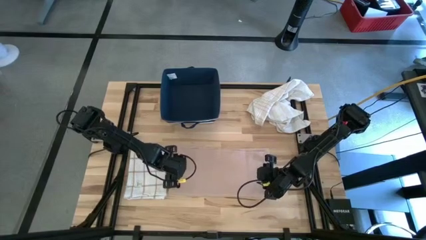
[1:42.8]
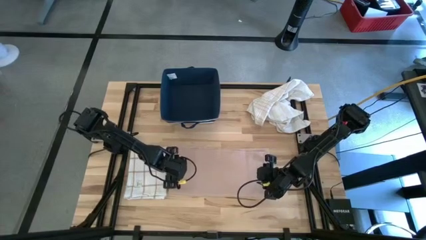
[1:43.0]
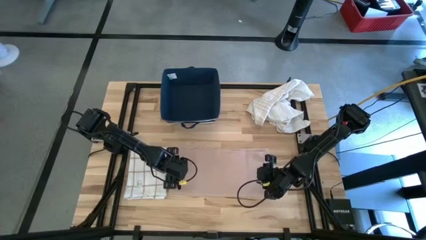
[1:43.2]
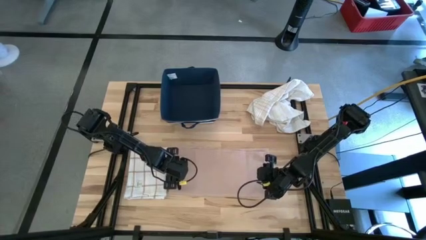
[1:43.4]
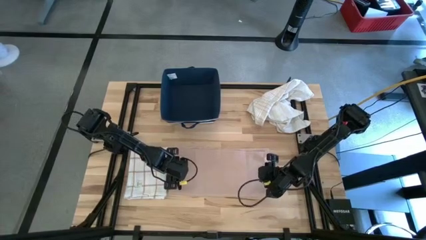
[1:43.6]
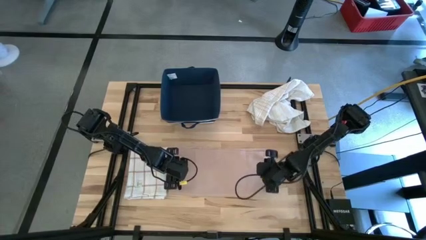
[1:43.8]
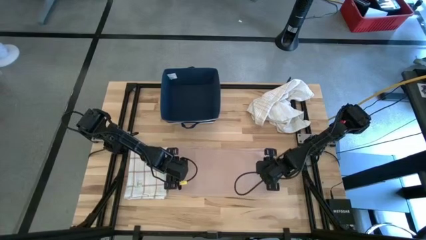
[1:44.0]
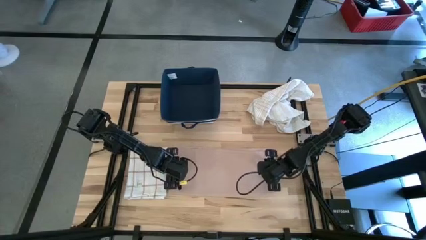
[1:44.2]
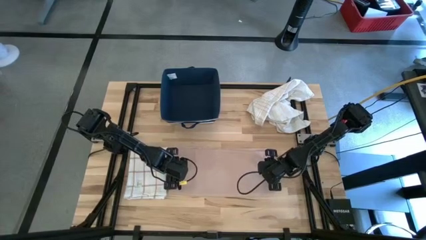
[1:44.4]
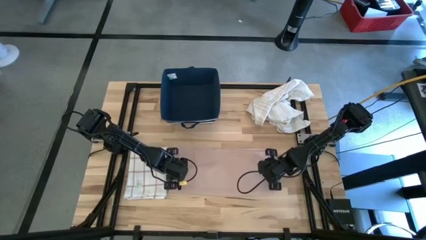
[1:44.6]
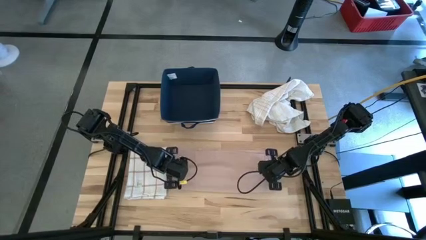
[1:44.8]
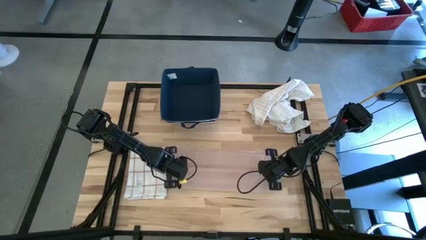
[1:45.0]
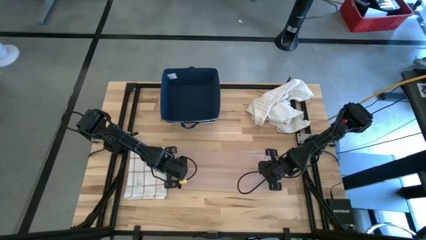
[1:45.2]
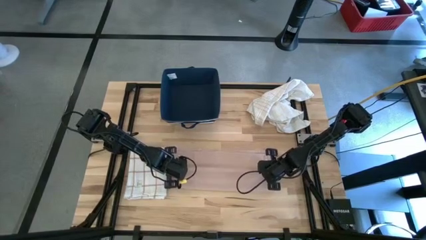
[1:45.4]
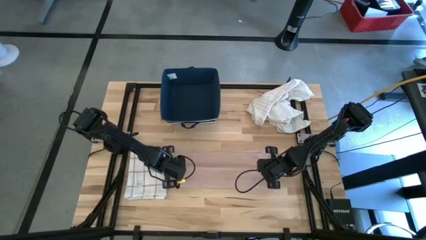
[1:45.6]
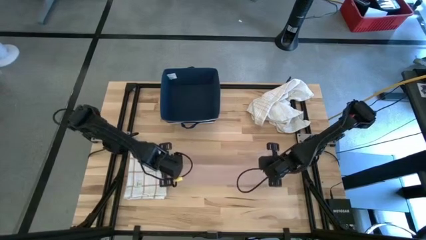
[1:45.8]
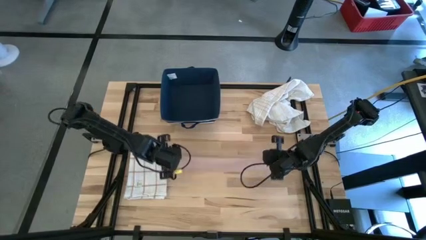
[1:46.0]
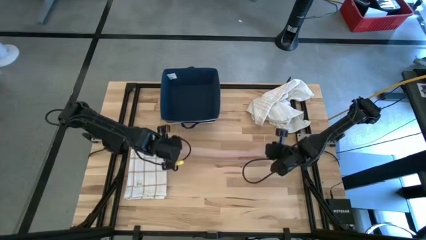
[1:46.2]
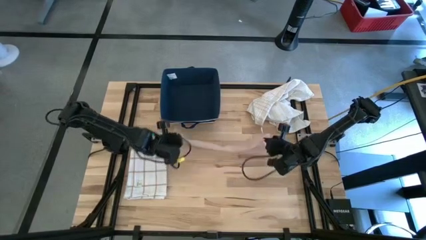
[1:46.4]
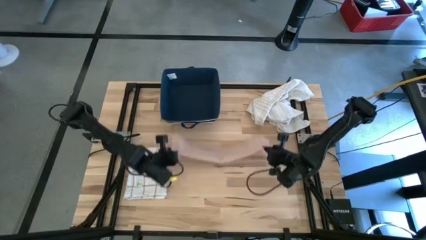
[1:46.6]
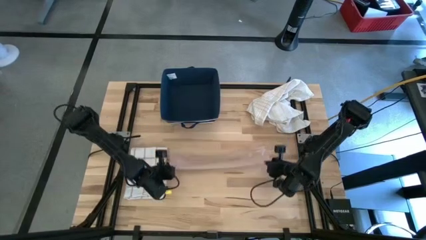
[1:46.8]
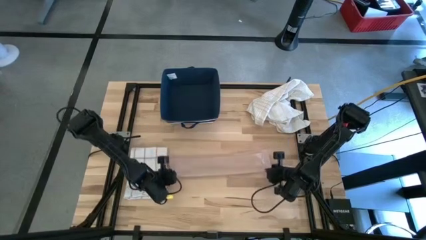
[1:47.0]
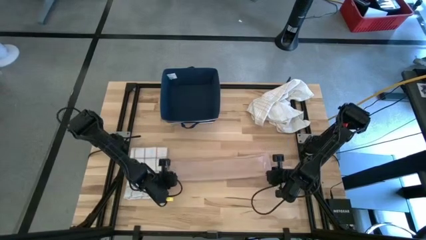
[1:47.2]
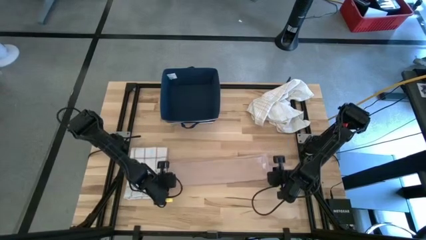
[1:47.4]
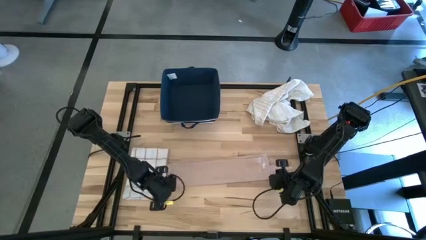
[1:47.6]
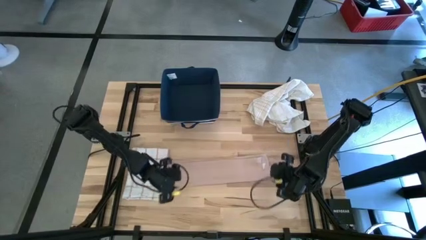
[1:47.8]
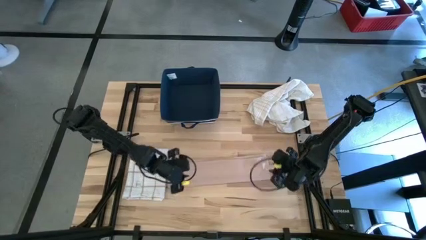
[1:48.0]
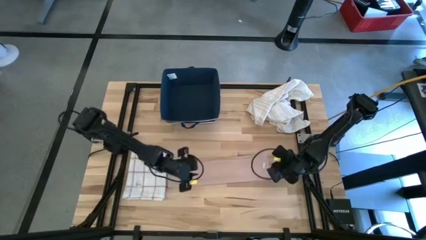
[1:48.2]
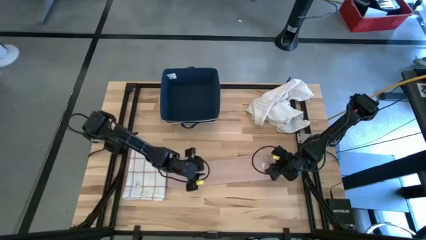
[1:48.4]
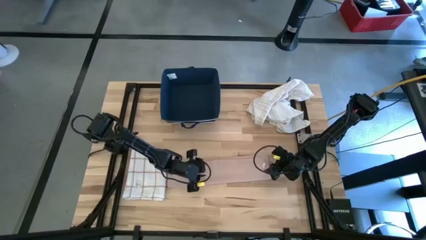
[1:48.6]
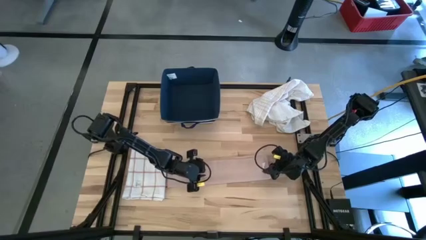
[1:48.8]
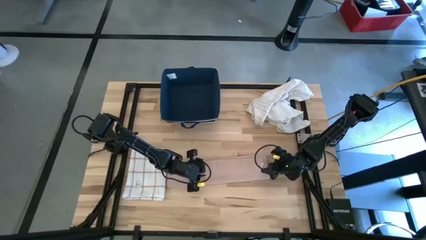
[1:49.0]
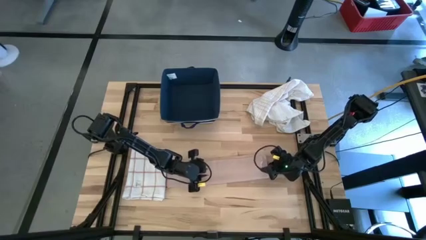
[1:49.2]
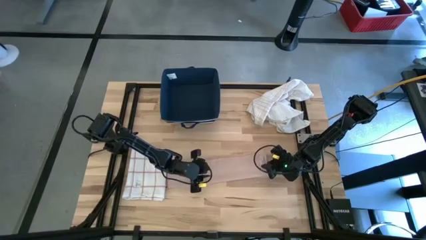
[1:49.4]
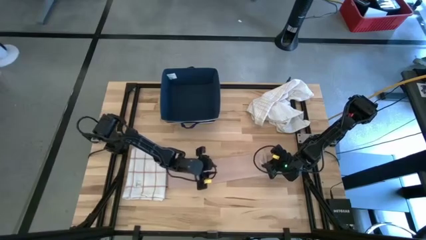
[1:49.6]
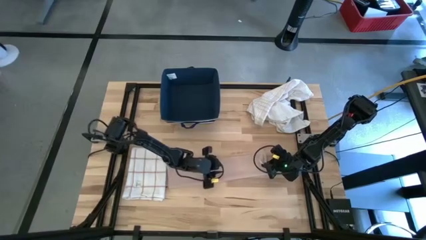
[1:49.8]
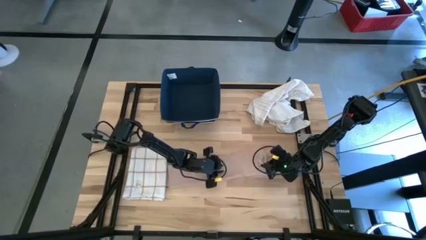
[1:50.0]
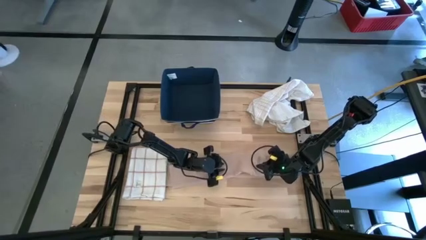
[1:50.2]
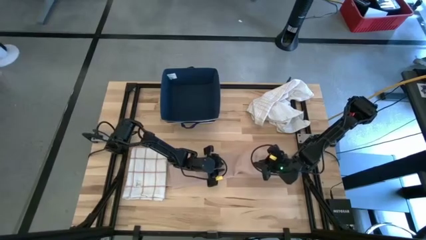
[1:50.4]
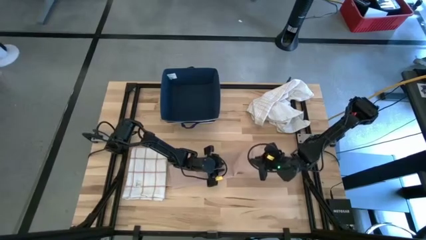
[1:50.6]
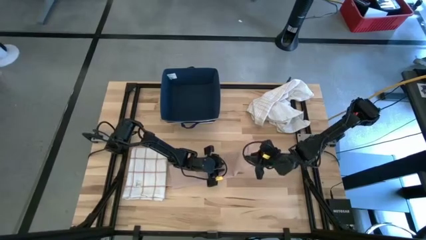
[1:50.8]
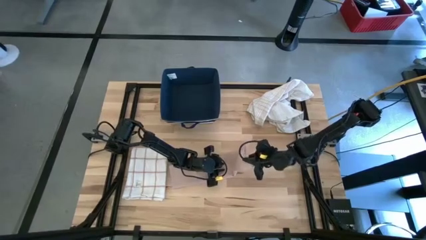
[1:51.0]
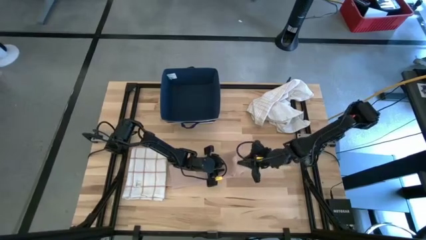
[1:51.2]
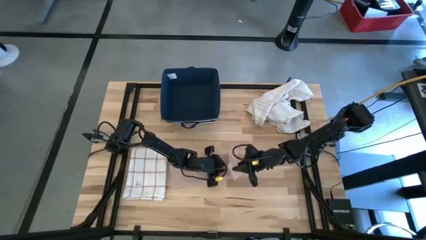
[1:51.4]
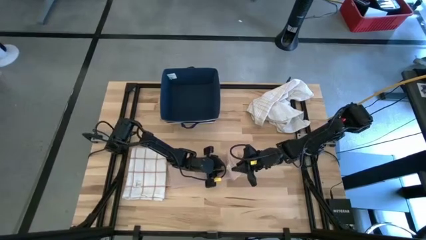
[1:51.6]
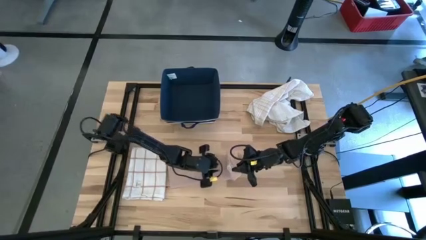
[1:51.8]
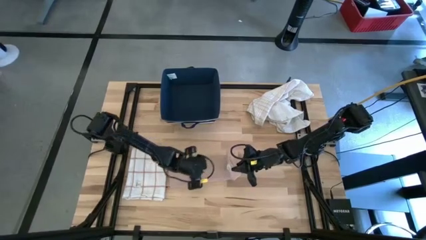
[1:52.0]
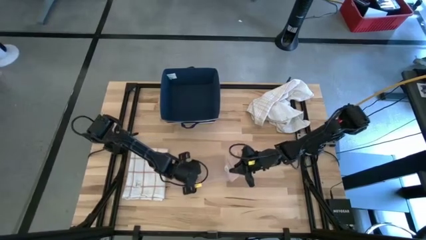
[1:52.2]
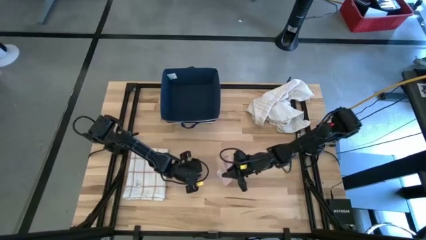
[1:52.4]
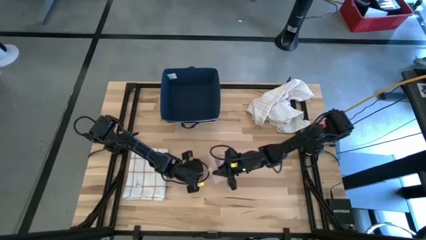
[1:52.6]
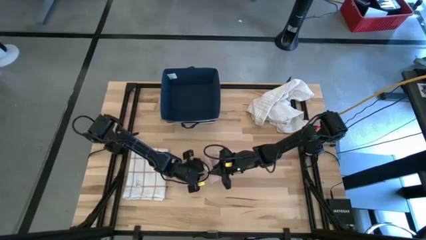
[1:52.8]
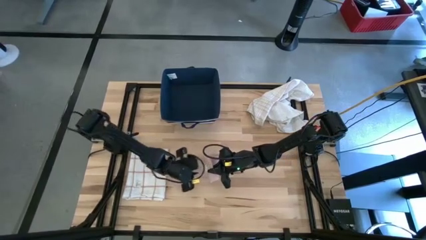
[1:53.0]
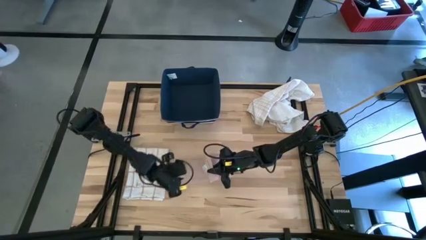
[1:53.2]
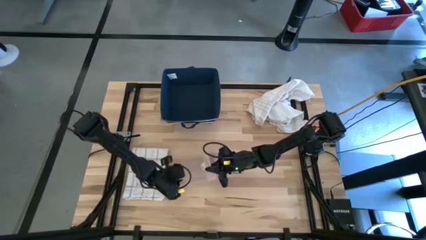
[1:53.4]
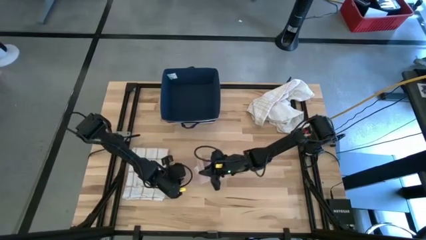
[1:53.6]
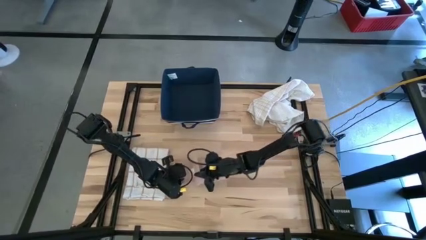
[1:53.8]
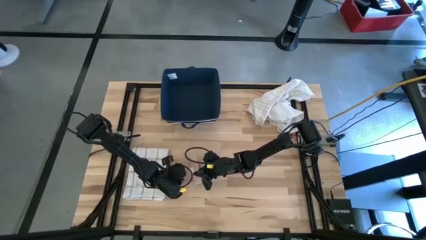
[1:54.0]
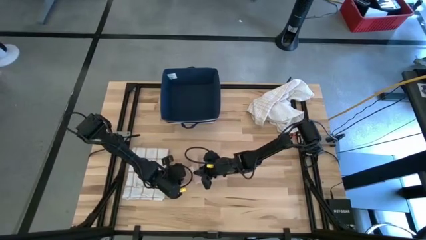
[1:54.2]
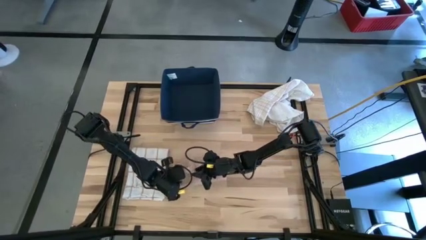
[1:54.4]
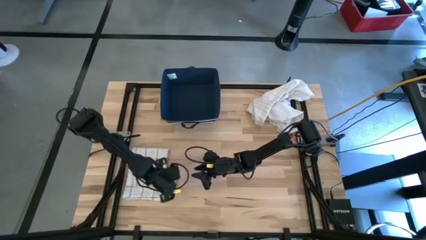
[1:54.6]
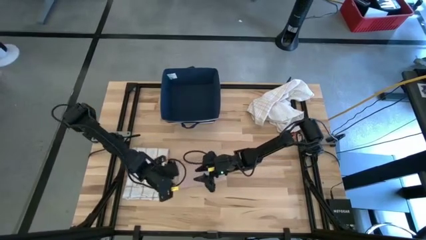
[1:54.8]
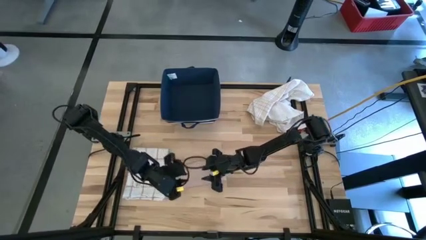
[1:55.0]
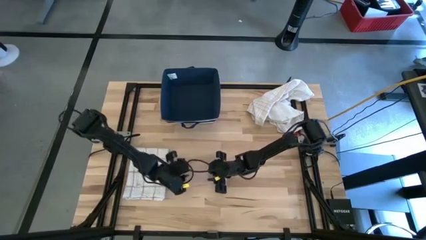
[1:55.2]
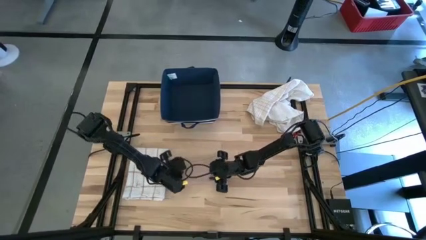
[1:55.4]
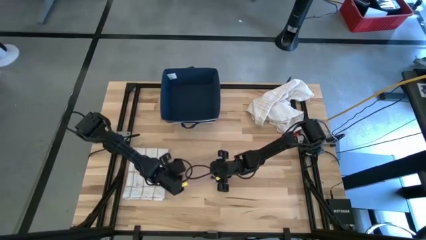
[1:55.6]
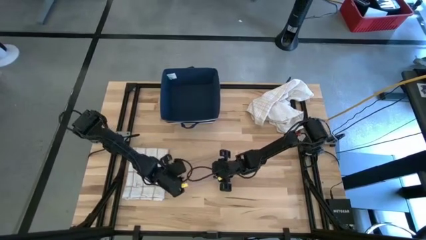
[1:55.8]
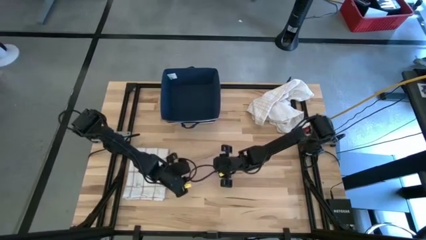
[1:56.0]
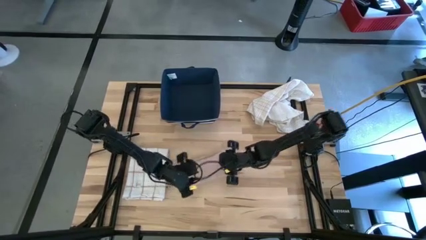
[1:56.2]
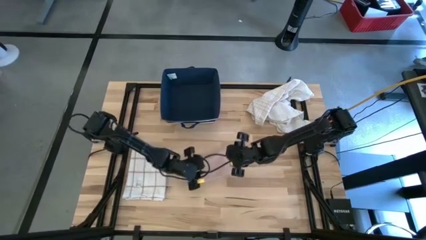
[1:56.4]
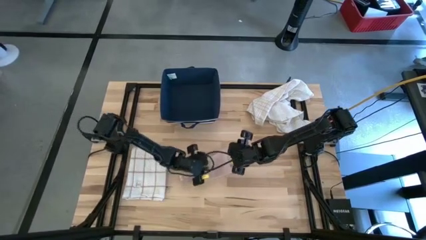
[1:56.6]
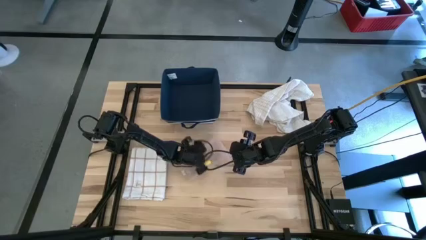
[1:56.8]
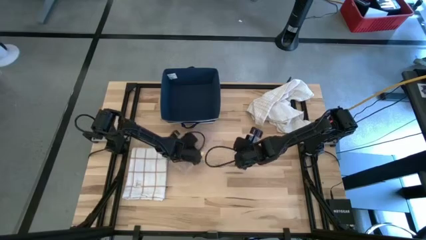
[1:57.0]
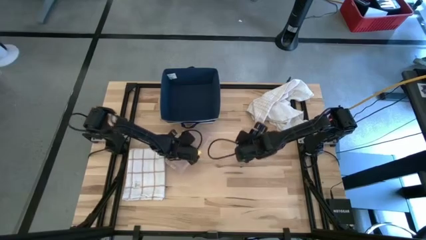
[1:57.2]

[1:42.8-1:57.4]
Task: Fold towel
Fold the light brown towel
